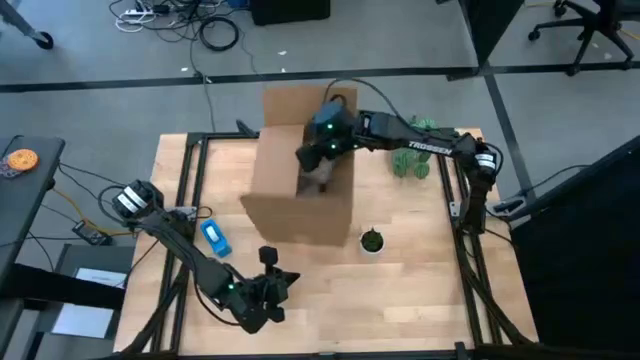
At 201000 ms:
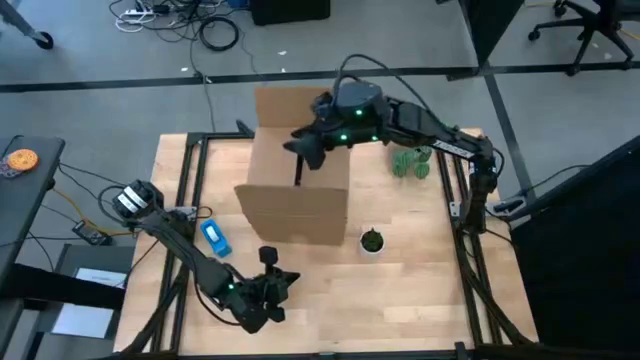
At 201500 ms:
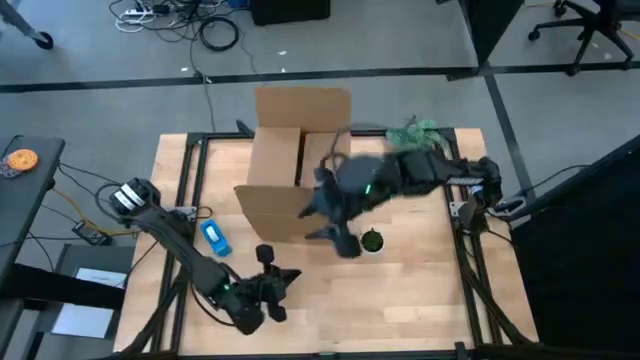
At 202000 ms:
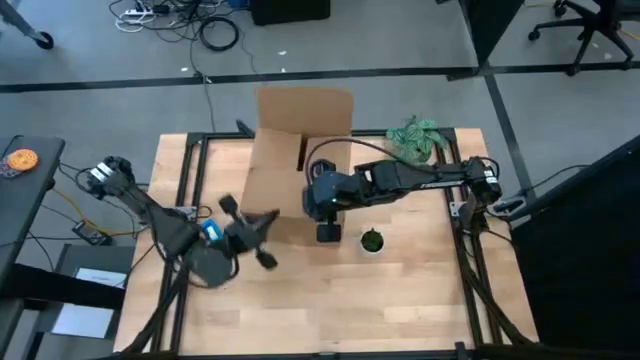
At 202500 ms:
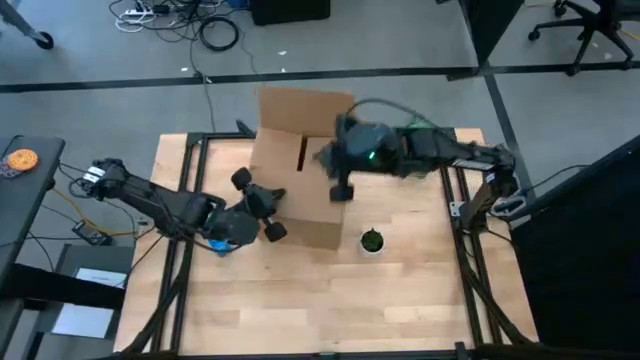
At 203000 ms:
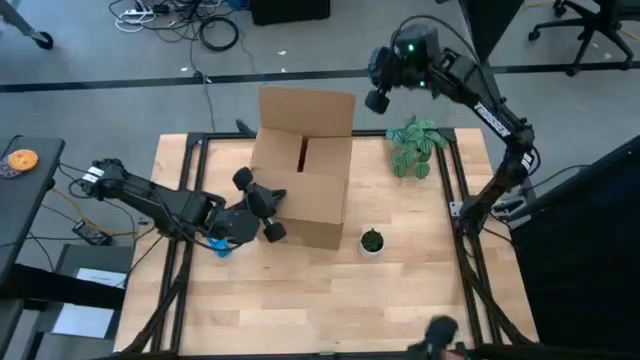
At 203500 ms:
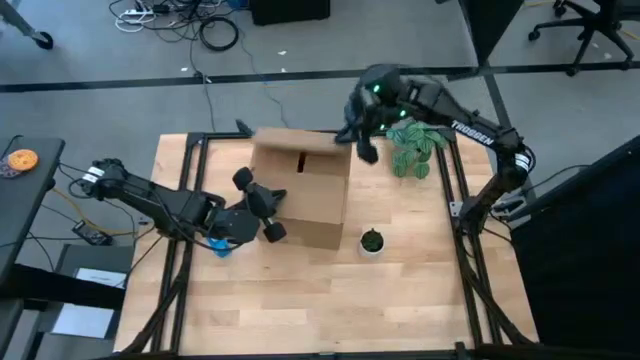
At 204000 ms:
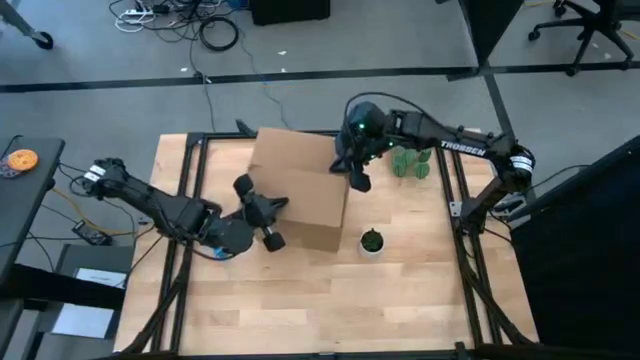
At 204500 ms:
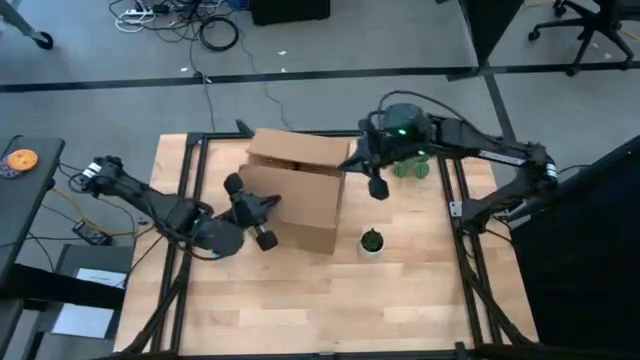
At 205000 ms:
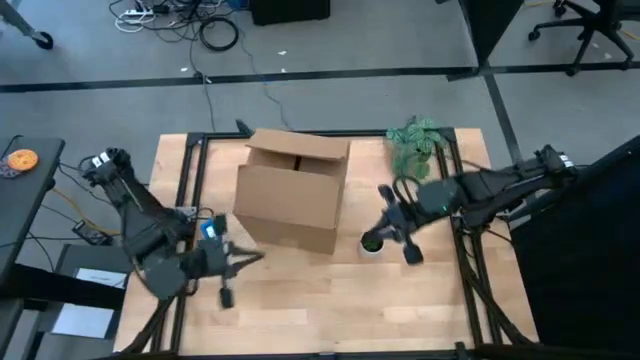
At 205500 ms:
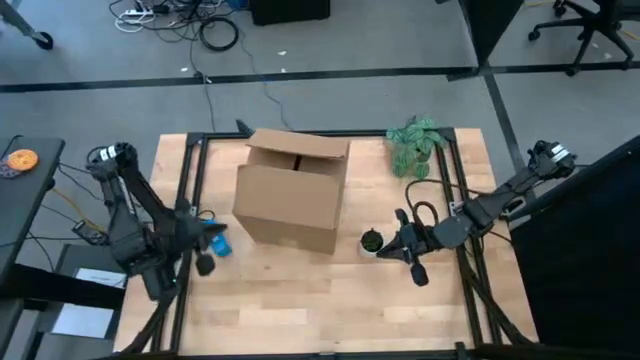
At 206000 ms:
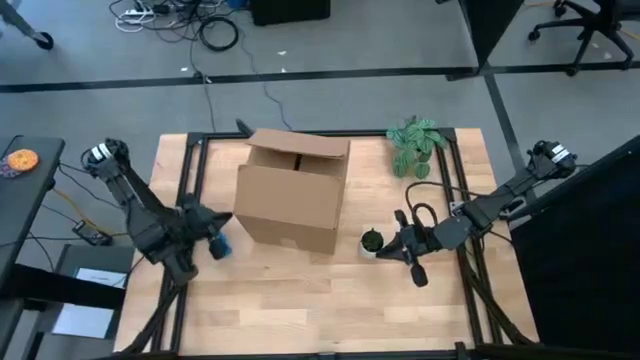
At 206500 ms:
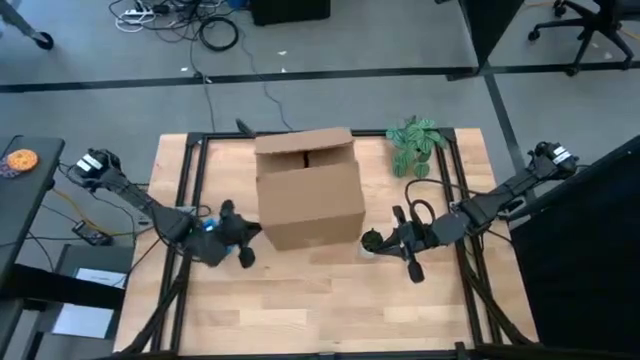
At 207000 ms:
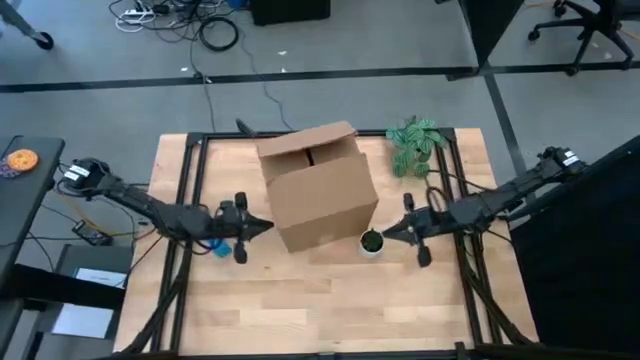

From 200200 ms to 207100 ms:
Task: wrap mug
Close the brown box

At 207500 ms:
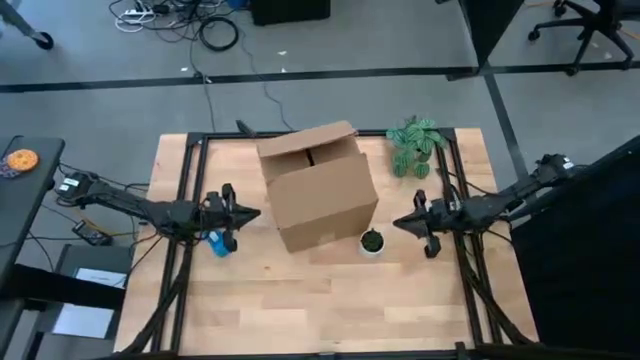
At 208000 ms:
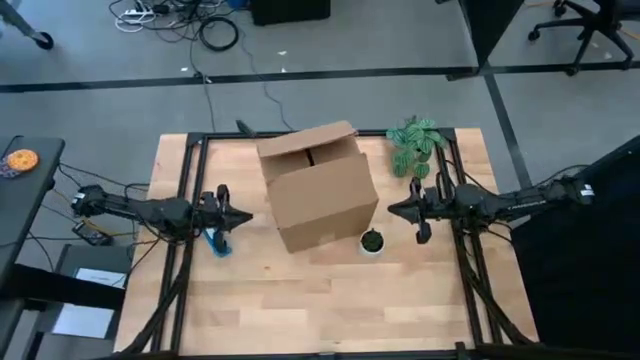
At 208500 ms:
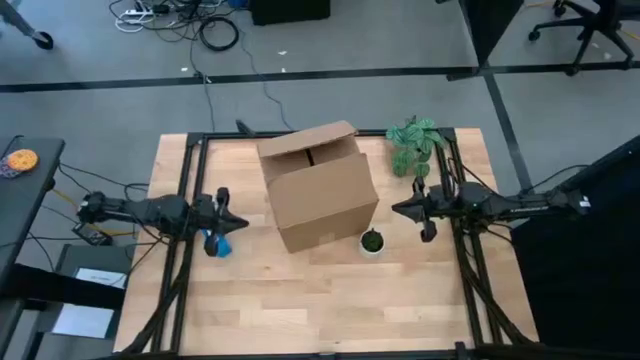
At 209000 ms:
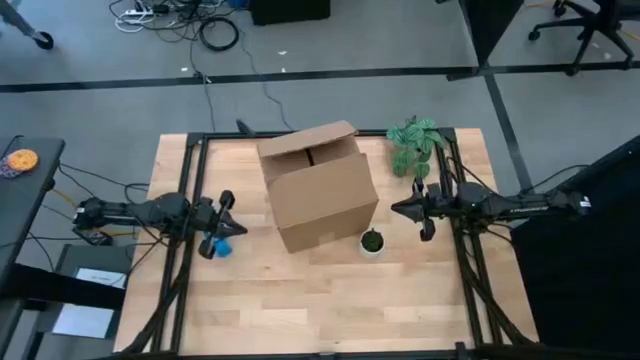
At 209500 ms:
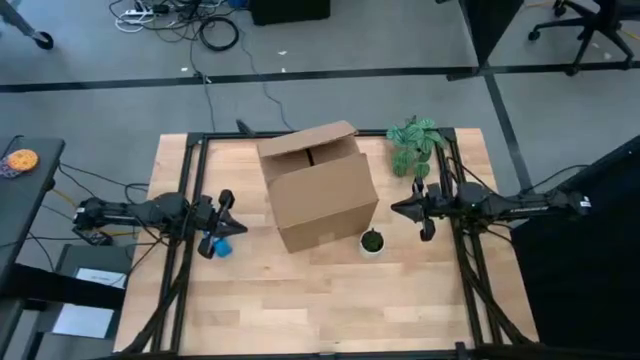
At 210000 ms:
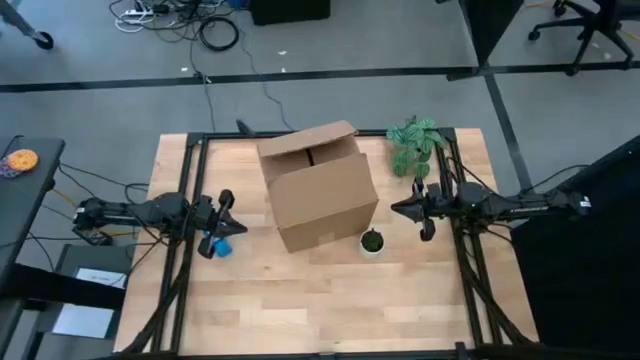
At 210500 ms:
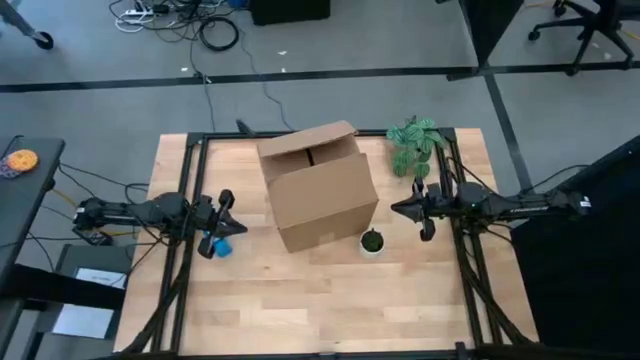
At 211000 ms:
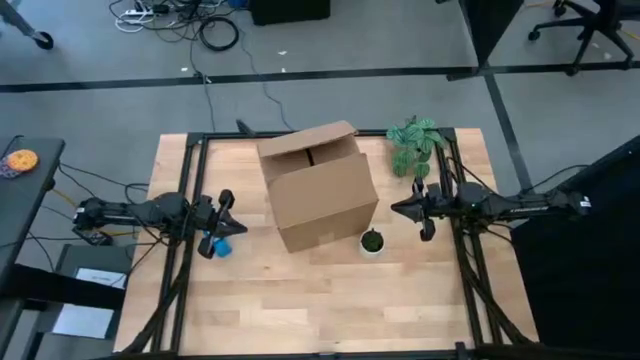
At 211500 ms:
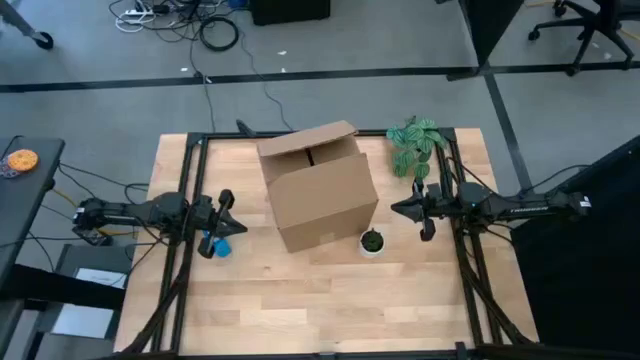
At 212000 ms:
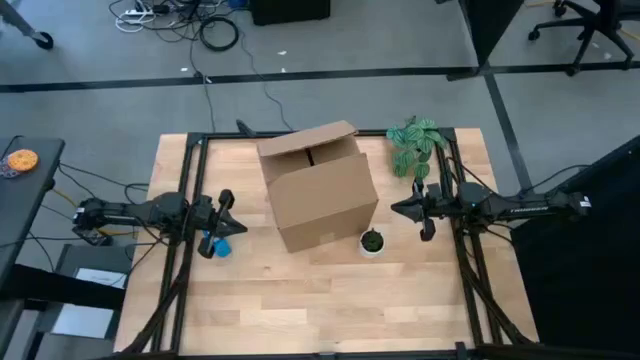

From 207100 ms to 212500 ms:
Return to Home Position
